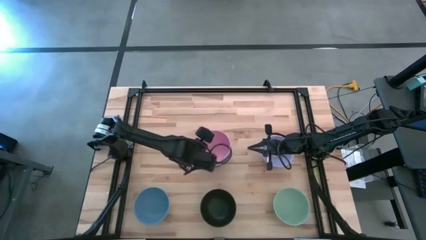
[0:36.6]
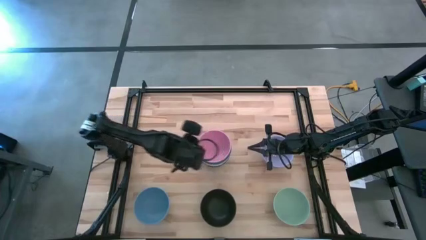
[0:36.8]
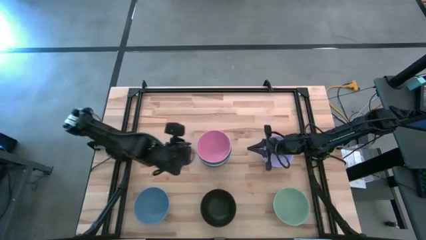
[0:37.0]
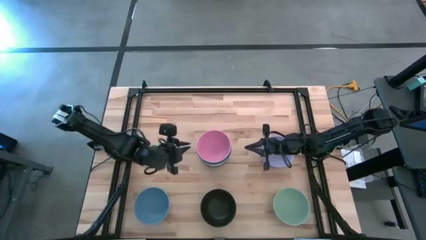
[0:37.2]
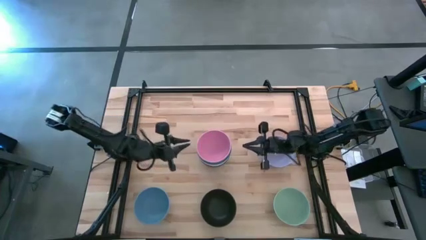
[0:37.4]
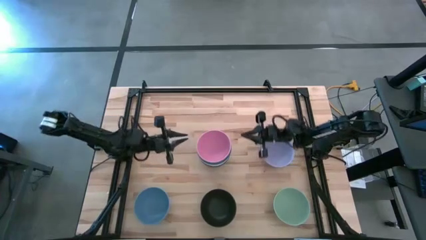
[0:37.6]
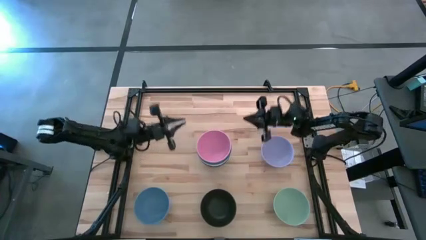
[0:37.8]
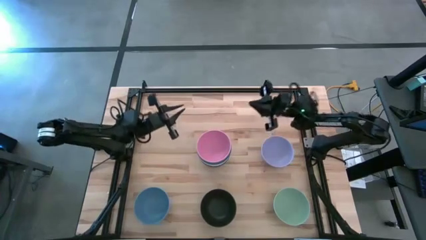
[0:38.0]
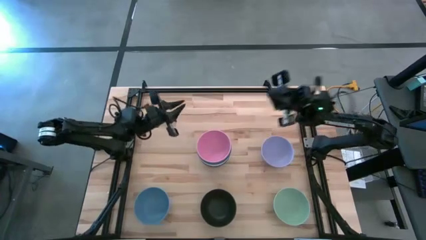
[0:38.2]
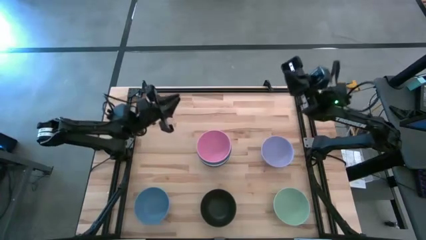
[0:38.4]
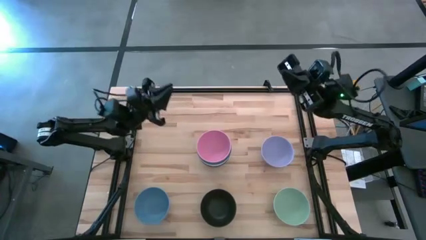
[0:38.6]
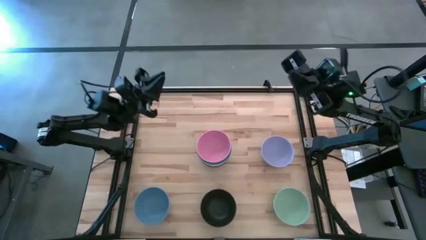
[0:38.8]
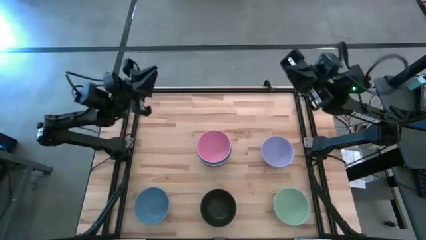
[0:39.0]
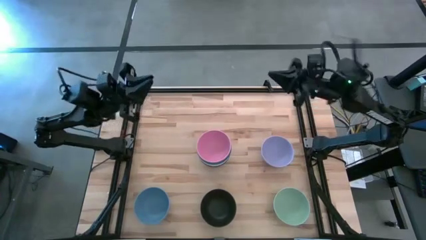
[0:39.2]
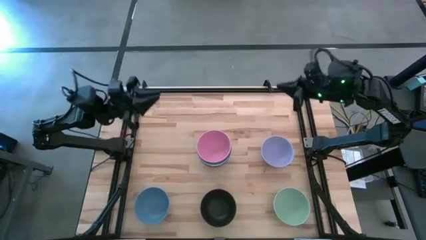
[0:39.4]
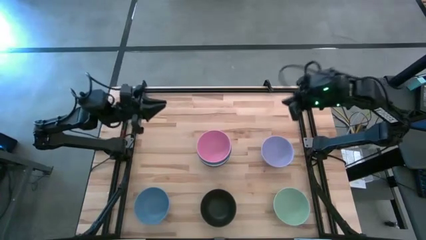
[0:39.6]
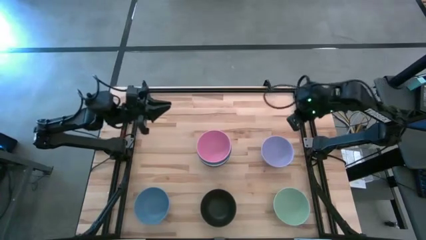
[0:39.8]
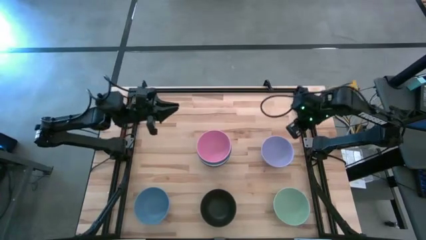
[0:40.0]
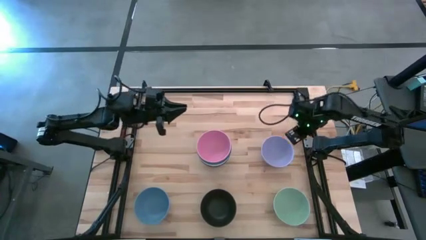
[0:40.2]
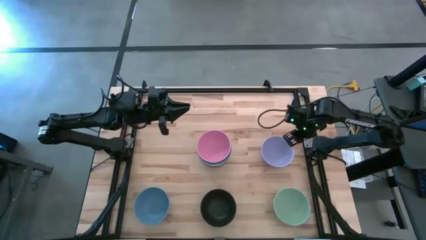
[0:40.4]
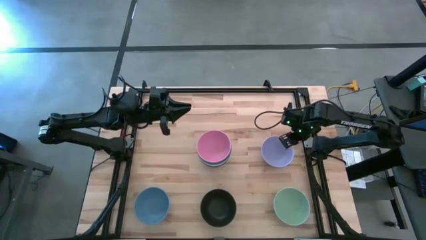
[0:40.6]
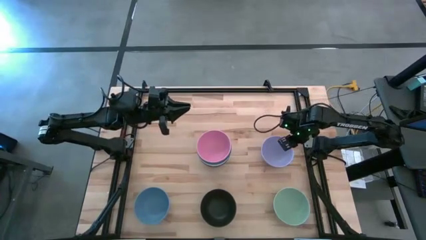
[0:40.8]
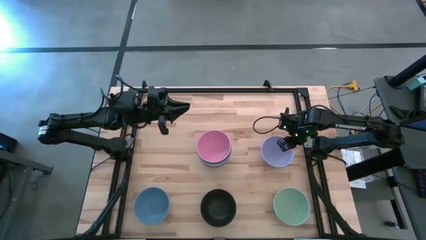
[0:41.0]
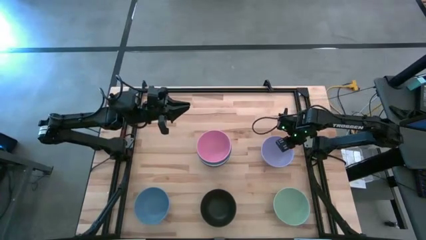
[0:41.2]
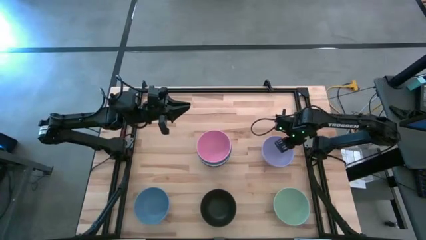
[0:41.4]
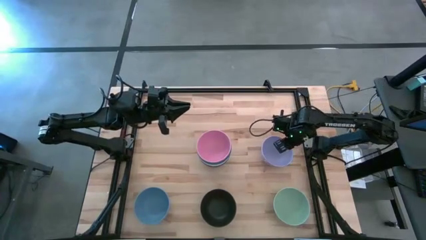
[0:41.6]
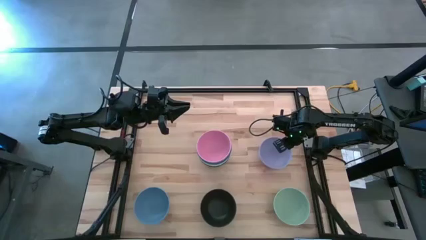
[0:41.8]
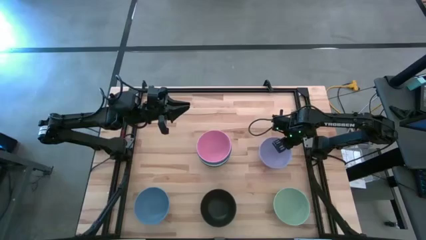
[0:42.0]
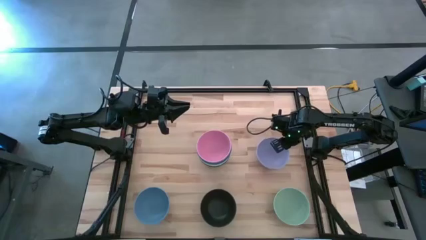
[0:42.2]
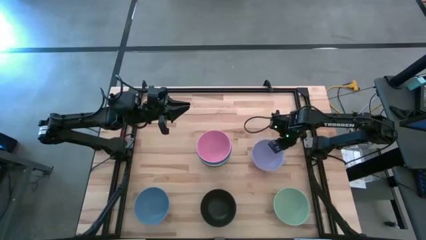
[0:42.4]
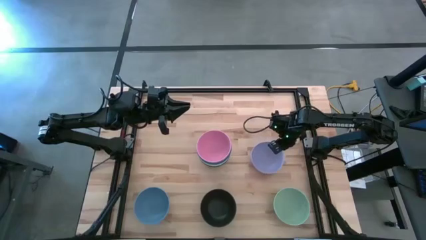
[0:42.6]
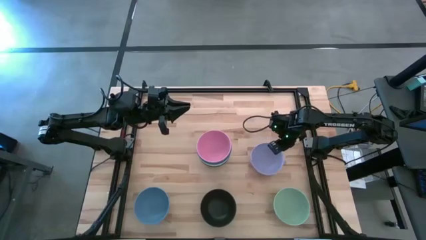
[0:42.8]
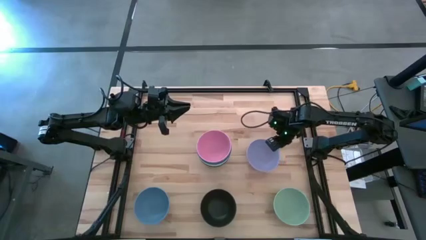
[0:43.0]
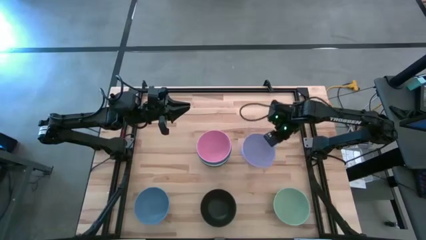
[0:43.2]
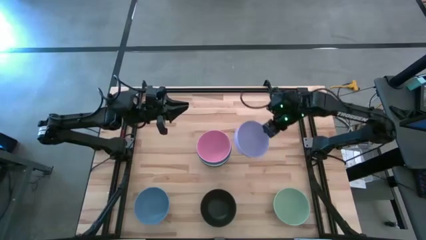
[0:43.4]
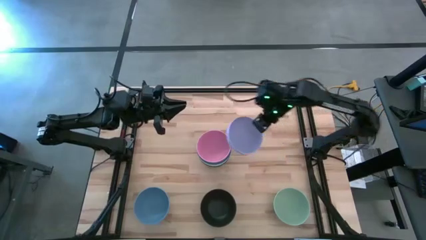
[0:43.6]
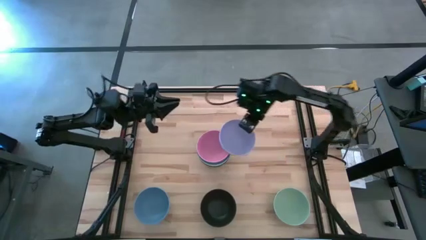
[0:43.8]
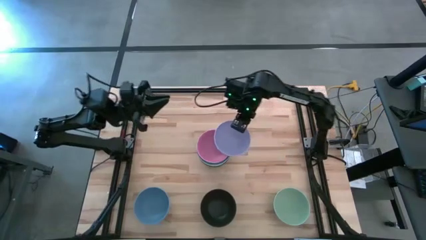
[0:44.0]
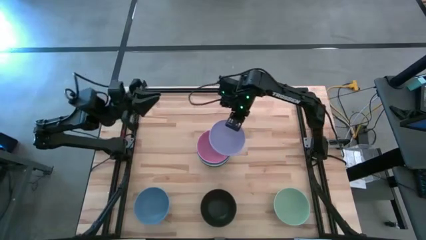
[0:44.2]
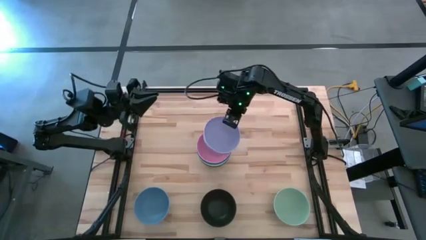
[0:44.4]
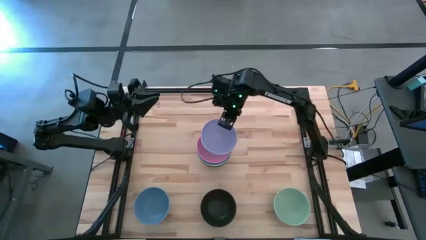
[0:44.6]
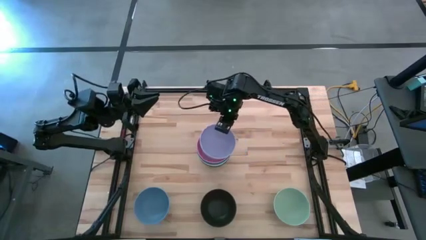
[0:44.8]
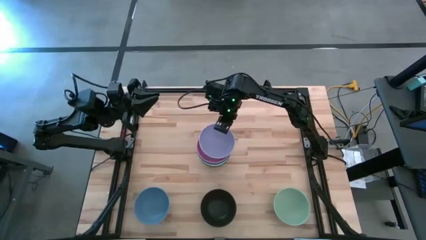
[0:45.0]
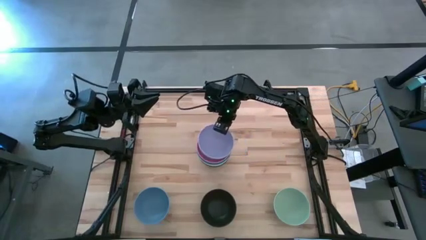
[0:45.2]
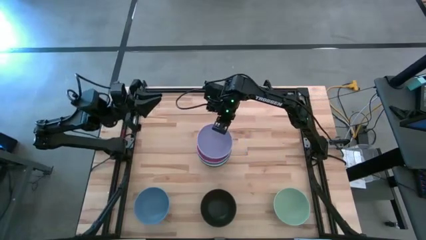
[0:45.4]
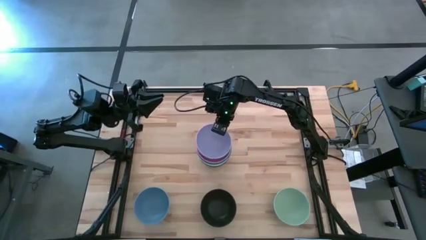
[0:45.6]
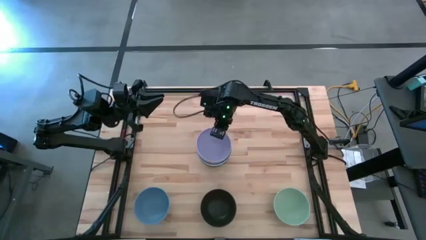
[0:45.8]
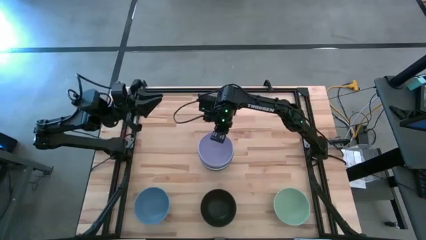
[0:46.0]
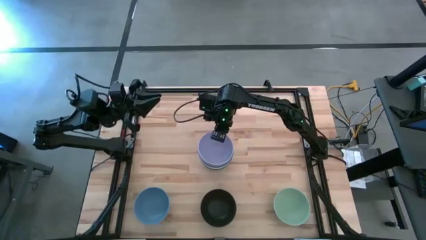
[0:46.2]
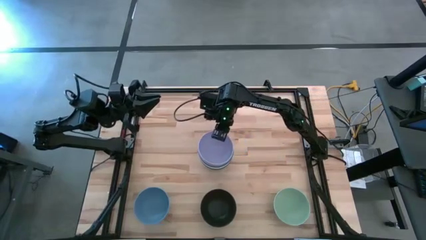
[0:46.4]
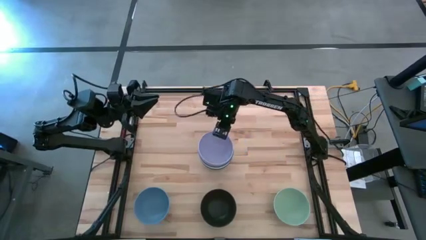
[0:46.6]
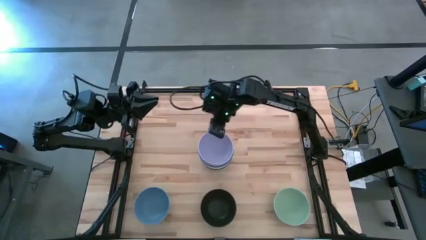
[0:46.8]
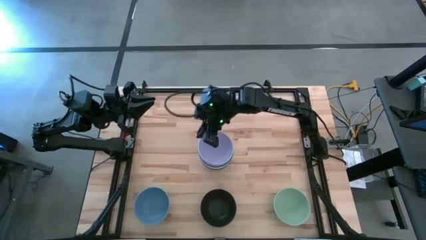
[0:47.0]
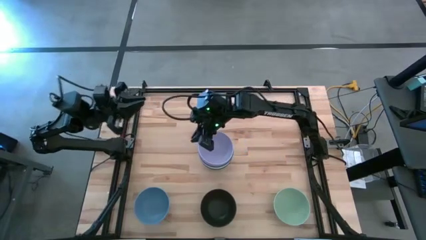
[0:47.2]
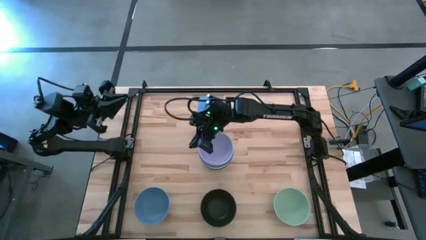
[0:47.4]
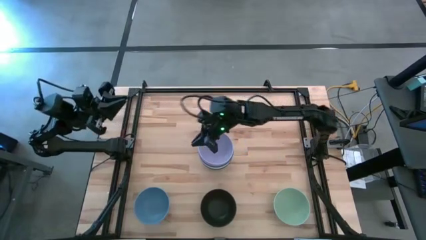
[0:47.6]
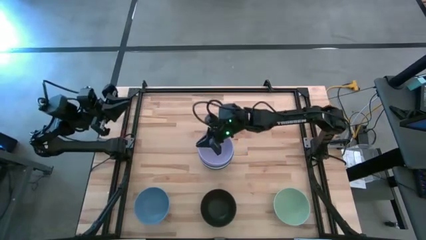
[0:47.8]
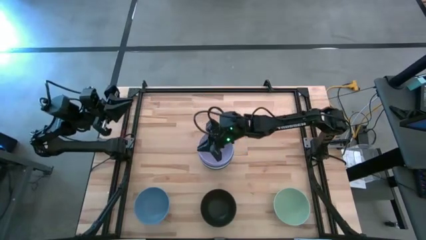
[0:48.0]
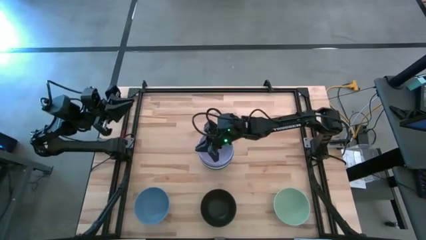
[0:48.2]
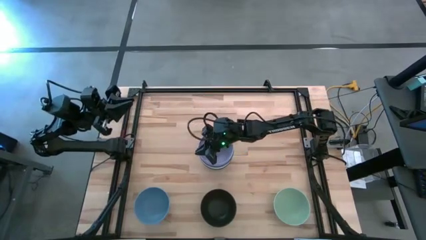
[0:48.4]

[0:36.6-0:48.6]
Task: Nest bowls inside each other
Stack the purple bowl on top of the pink bowl

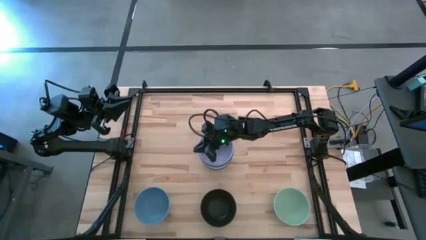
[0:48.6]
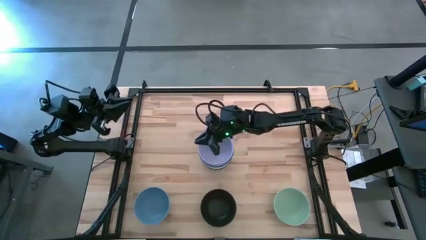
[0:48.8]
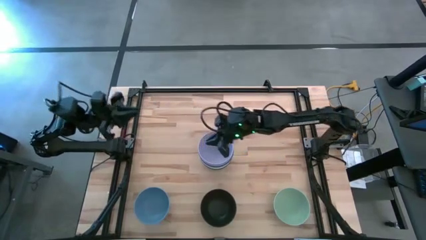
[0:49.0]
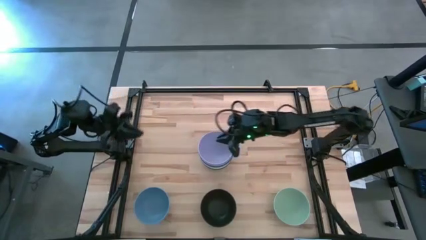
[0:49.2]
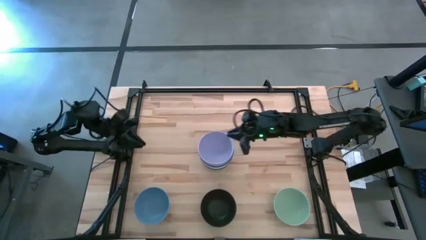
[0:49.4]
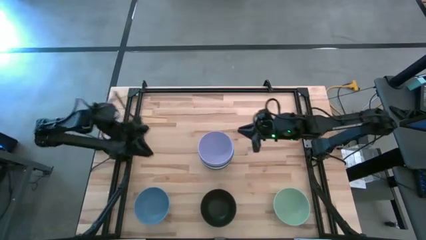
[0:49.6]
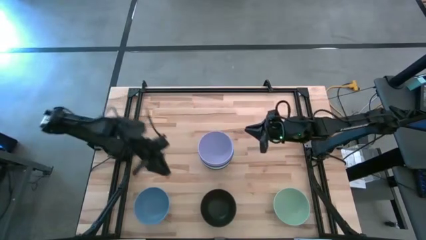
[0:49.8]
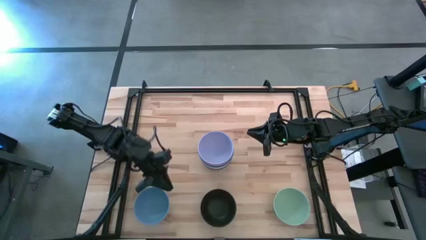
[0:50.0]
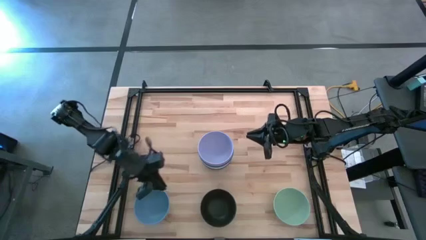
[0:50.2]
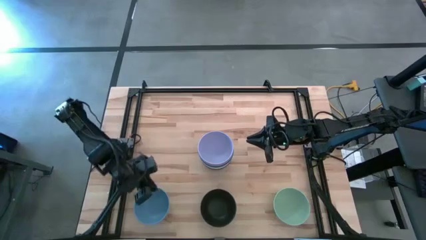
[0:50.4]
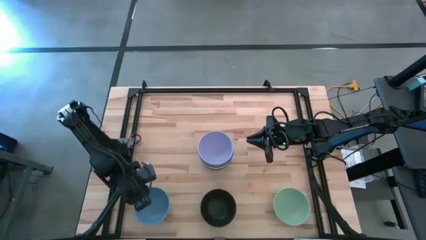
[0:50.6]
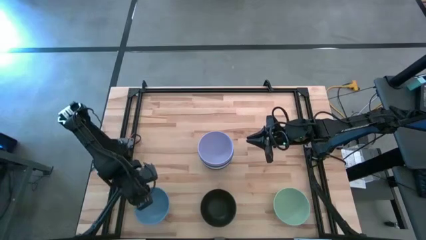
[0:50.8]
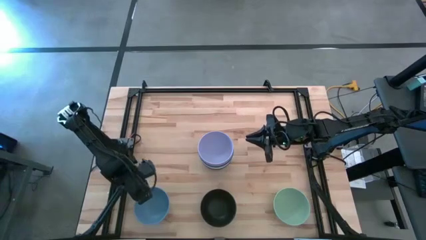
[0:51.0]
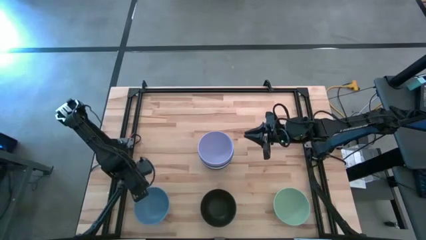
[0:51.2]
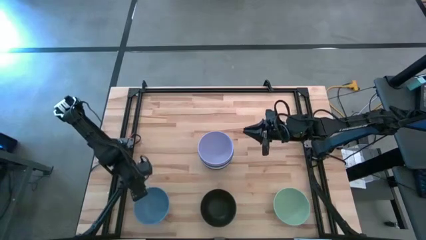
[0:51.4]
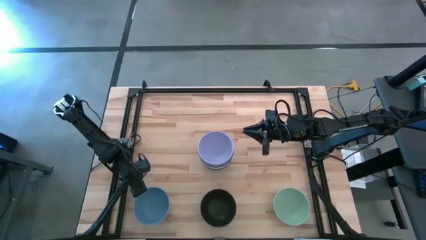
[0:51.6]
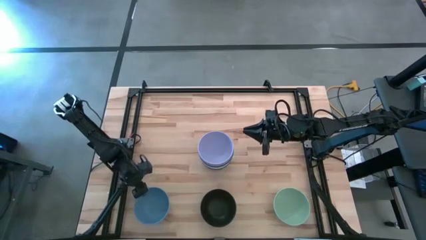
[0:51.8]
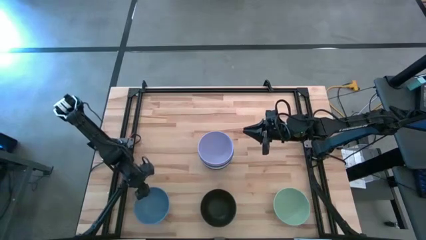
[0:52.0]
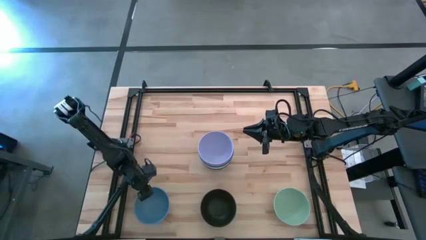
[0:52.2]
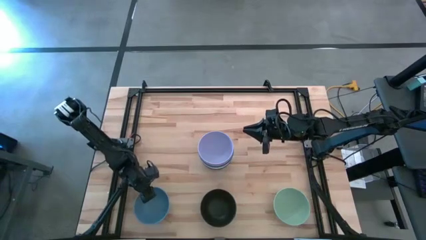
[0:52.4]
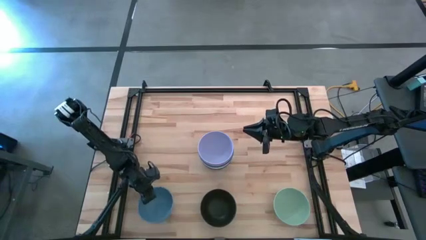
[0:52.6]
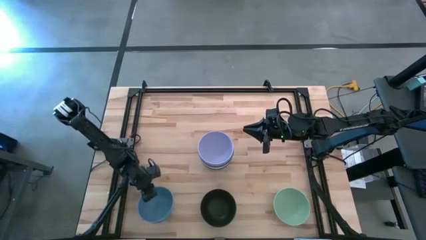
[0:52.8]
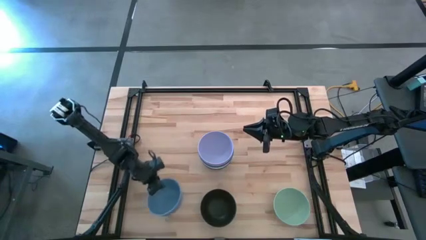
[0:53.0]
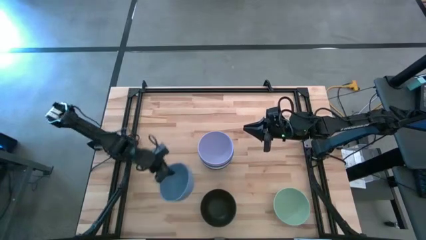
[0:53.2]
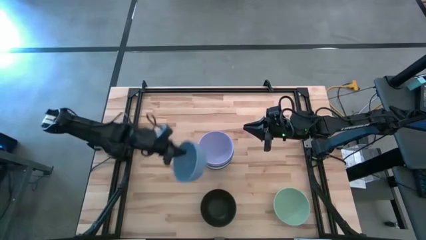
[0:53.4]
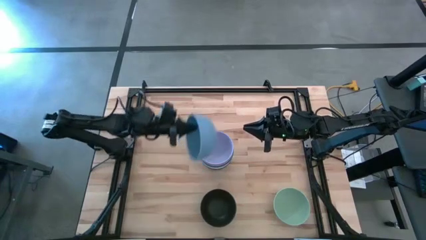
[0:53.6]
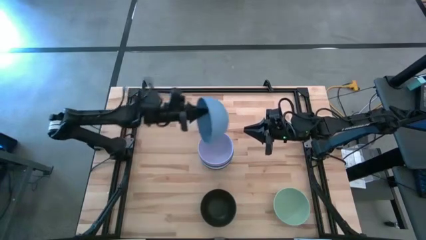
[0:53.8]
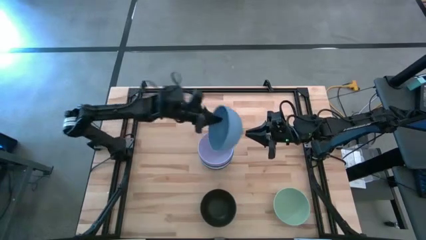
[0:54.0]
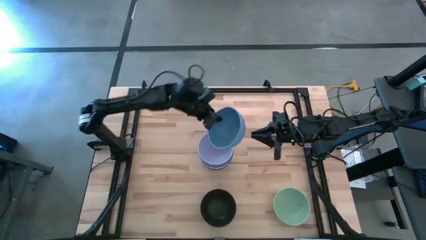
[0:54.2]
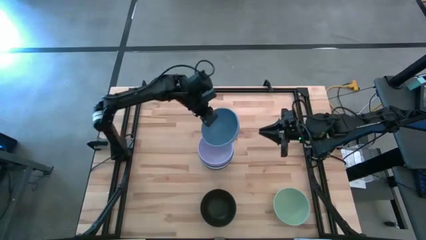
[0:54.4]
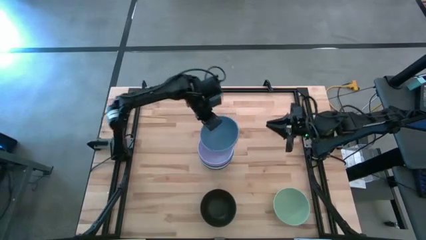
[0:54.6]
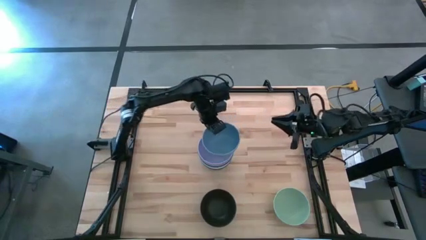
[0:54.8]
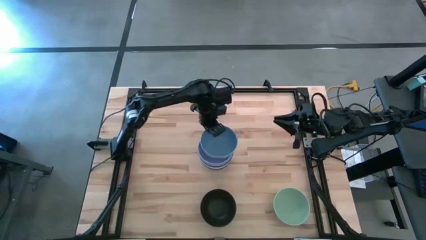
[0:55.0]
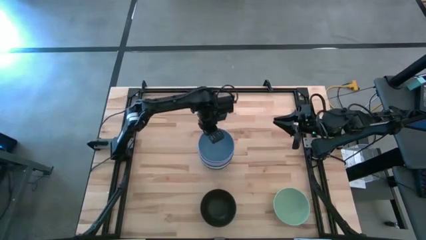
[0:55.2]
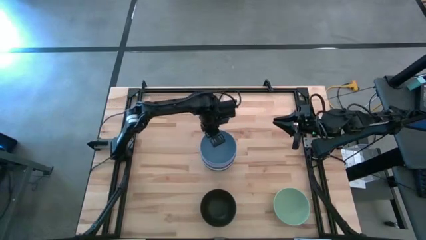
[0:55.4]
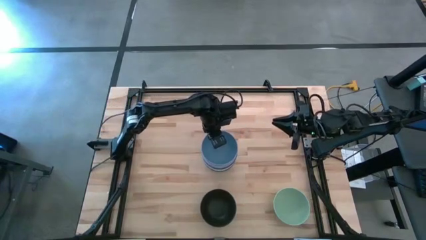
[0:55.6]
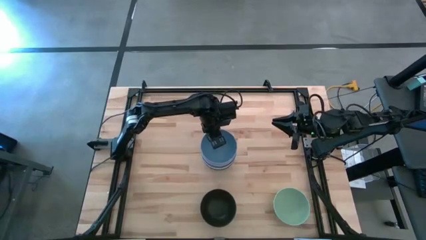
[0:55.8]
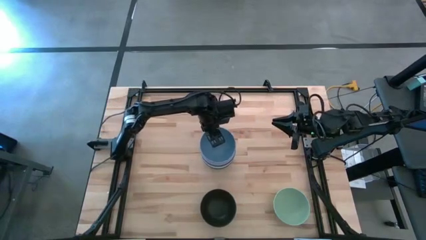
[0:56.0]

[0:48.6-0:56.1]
Stack the light blue bowl on top of the purple bowl
